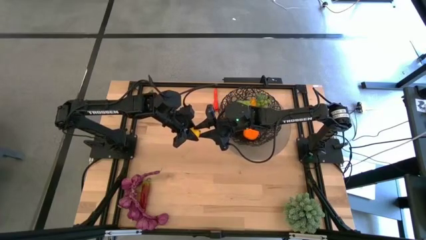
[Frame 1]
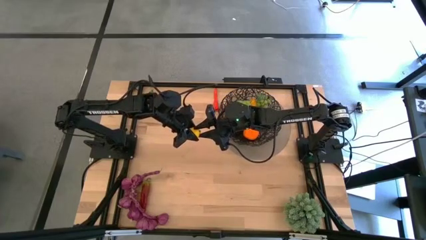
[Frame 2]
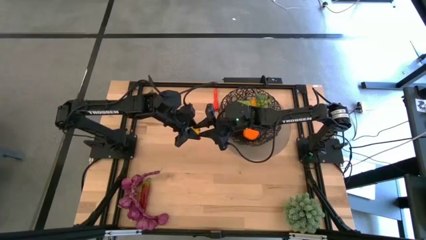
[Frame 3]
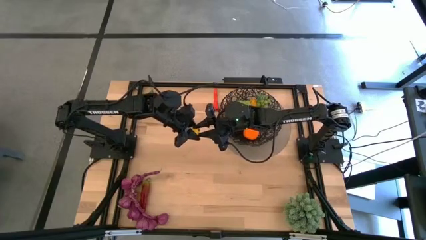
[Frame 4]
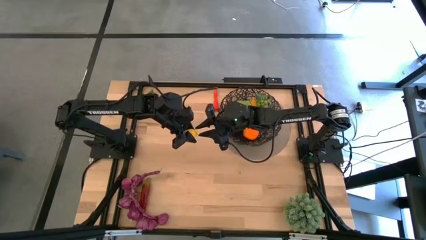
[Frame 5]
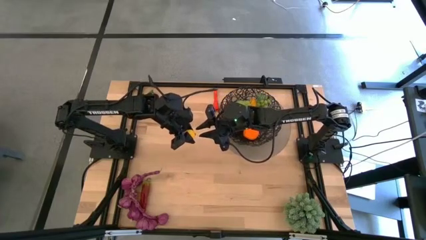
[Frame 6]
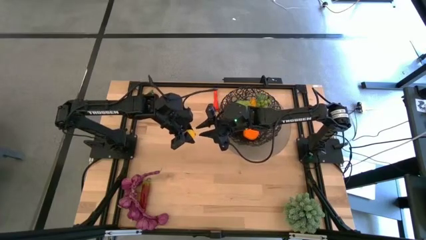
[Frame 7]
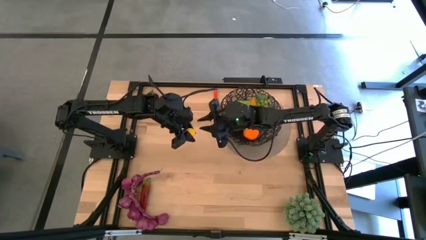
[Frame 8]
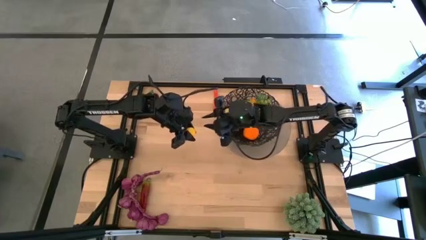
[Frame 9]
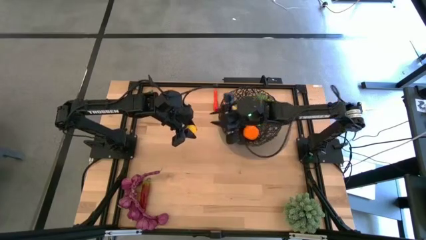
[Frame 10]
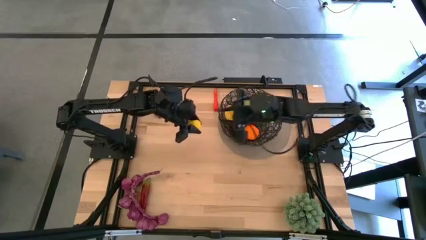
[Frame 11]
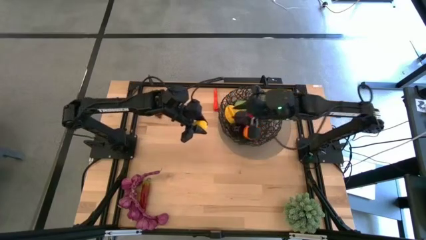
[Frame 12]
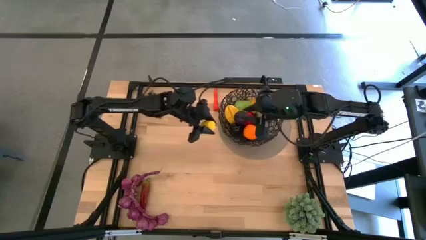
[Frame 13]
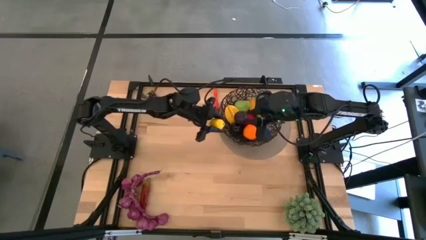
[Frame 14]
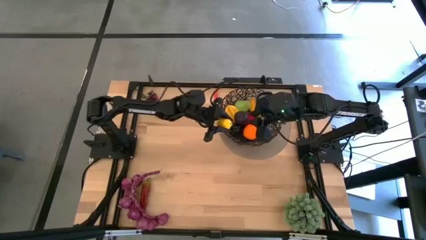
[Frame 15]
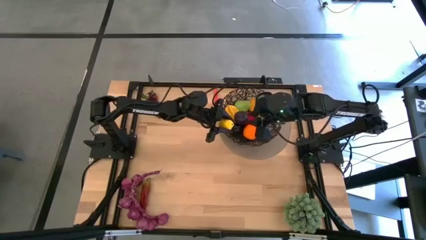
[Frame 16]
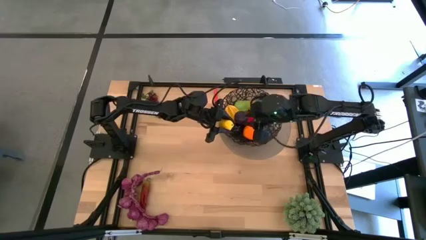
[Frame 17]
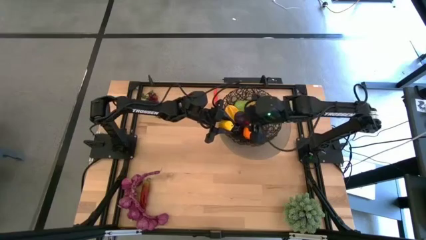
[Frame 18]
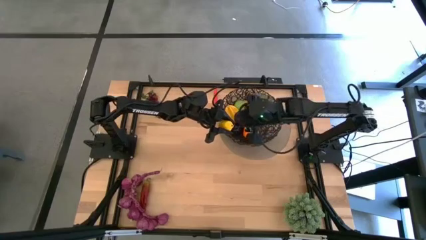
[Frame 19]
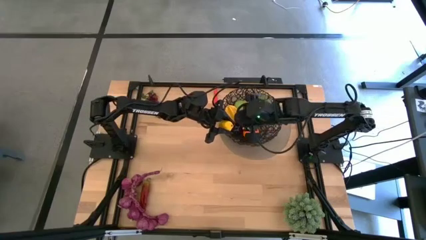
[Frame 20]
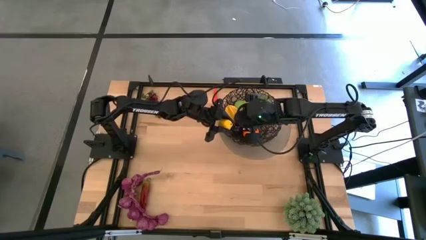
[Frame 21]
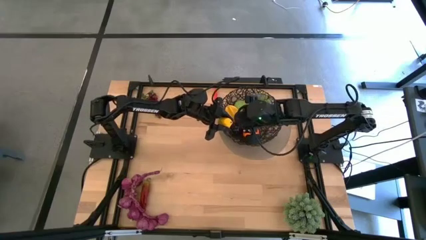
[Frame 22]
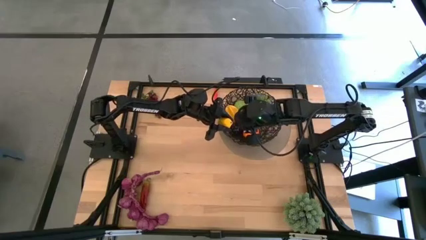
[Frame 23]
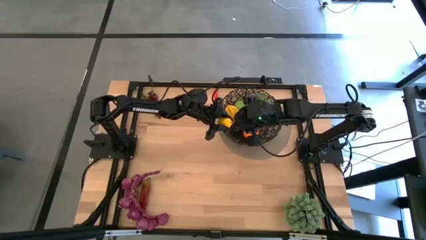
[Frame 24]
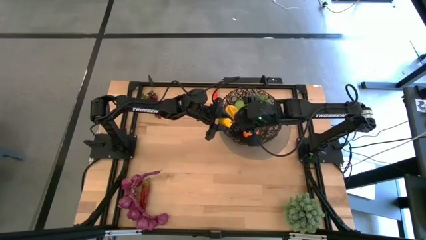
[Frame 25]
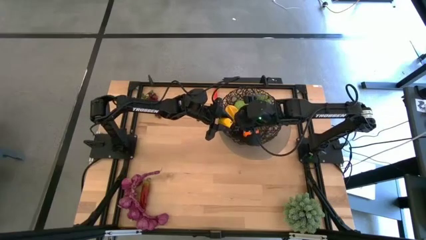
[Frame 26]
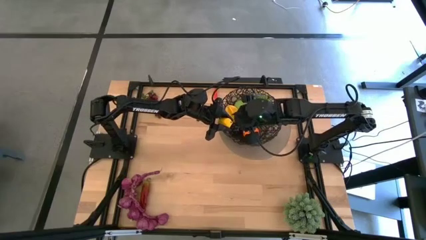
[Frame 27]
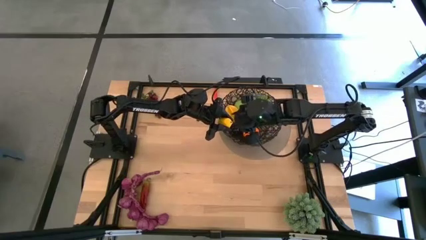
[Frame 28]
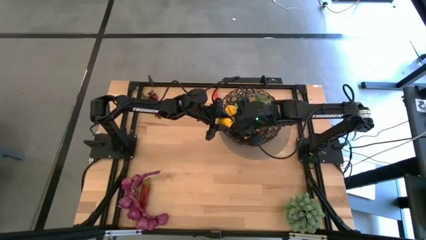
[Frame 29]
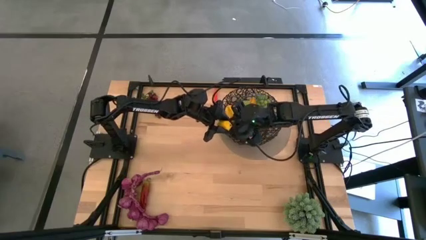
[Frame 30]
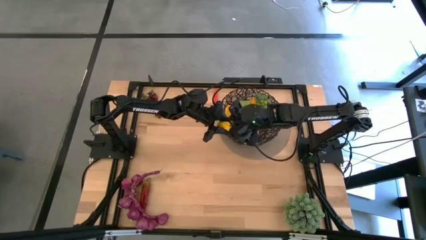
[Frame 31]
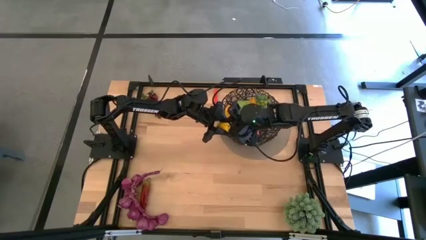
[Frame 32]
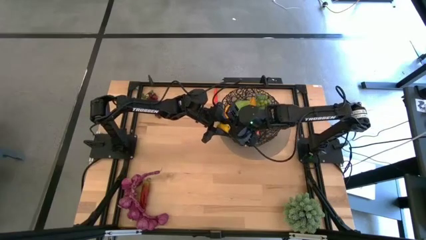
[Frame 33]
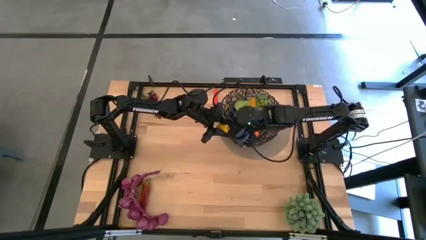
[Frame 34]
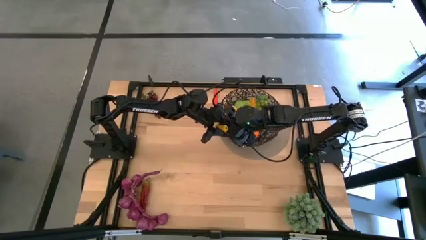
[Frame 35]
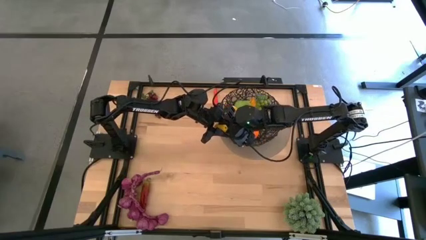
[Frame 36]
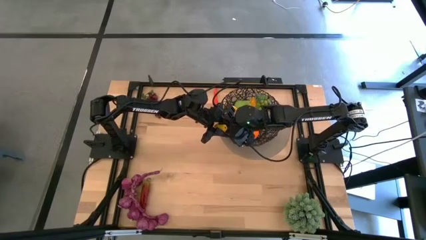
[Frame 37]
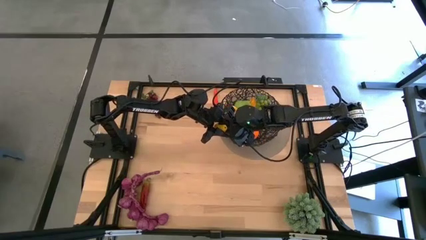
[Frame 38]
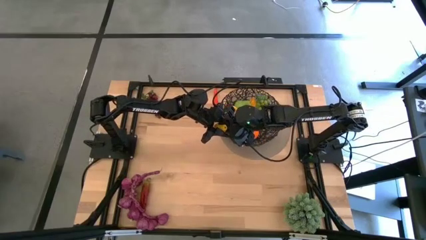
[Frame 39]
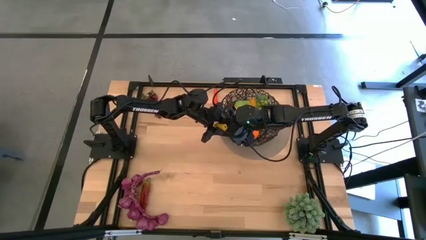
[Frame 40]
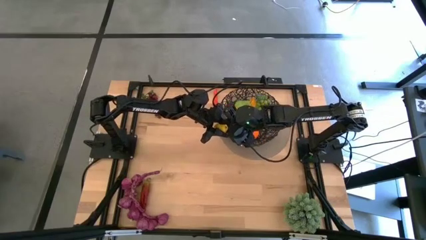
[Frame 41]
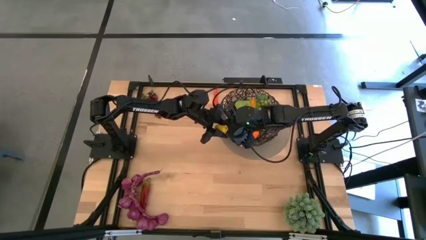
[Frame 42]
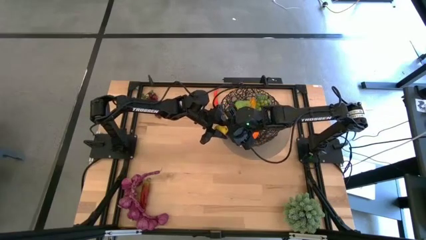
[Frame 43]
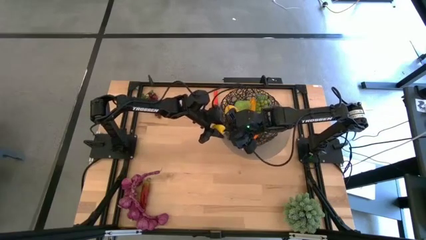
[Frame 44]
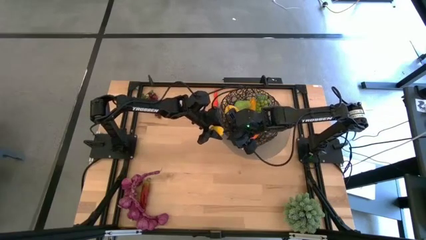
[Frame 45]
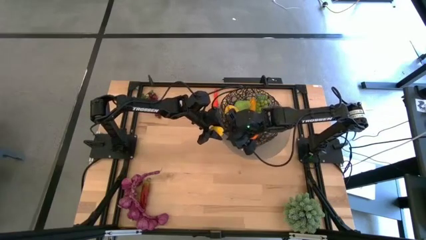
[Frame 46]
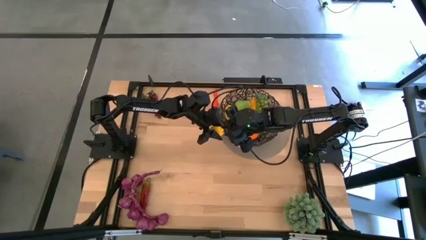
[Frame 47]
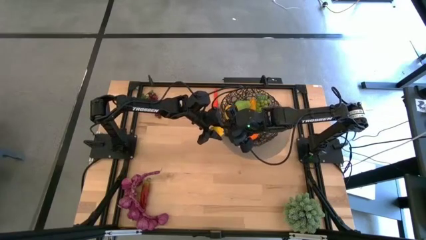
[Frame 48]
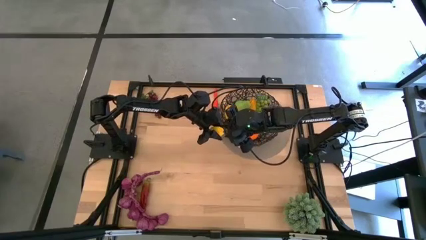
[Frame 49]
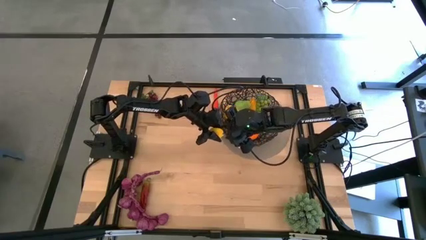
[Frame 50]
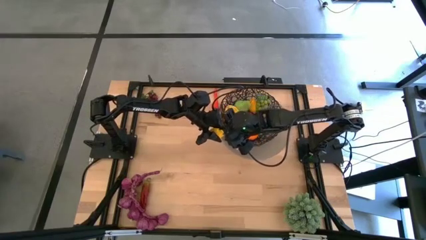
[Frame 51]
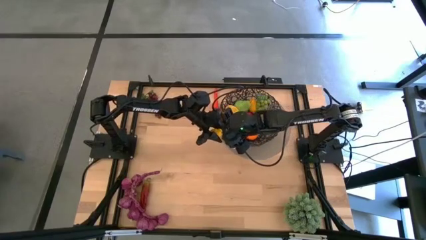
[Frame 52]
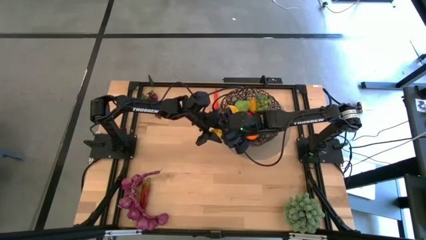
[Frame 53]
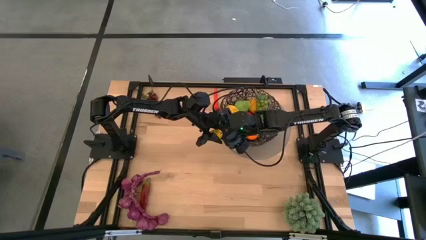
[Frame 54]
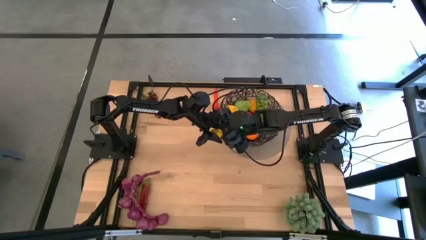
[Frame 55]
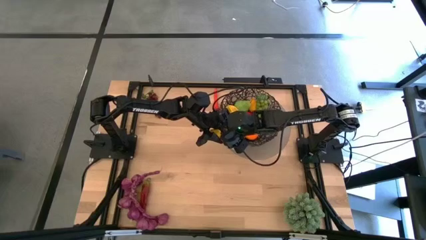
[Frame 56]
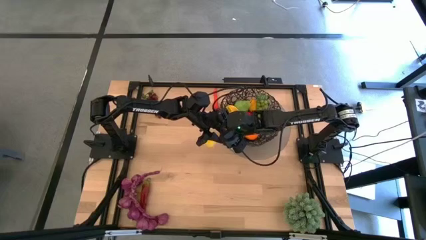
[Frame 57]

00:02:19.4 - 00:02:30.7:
Task: Build produce basket
Put the lemon into the black wire basket

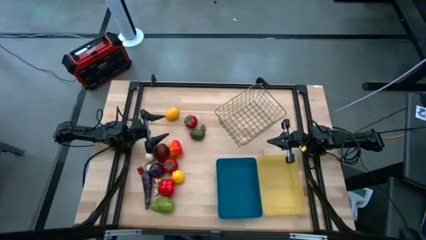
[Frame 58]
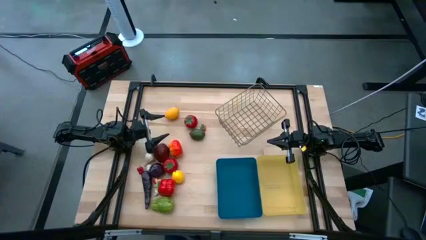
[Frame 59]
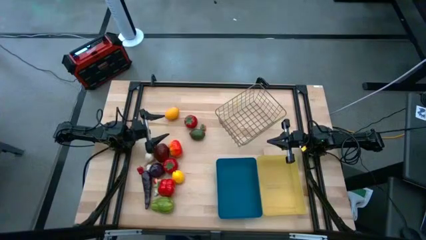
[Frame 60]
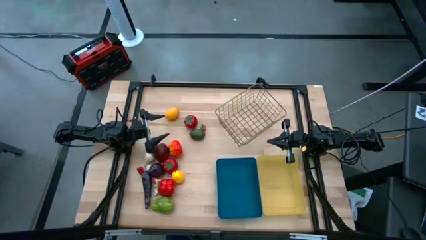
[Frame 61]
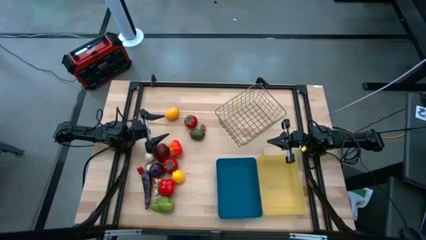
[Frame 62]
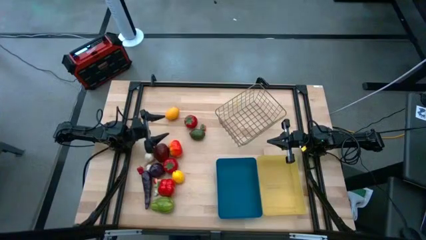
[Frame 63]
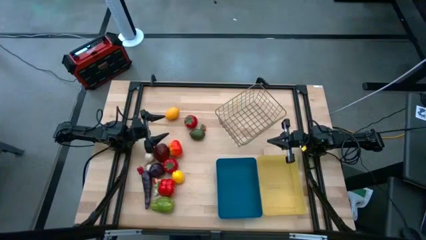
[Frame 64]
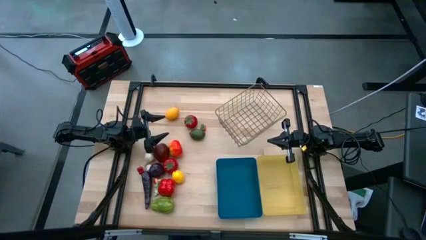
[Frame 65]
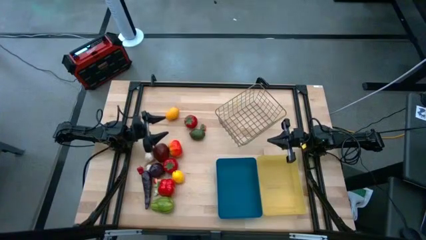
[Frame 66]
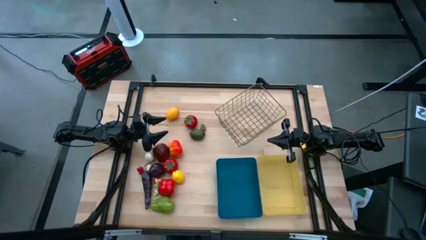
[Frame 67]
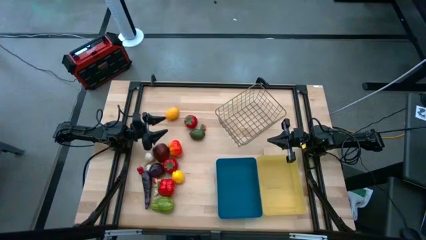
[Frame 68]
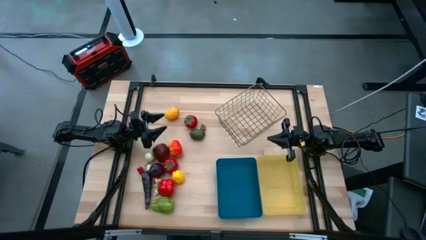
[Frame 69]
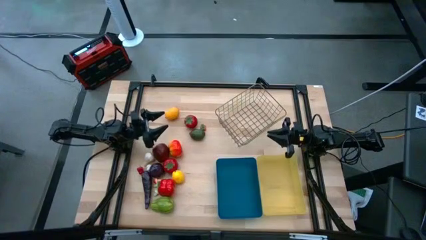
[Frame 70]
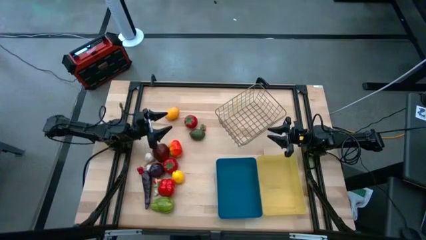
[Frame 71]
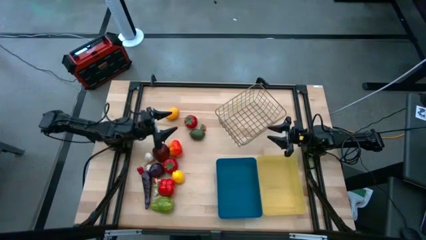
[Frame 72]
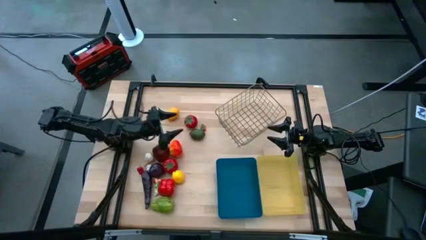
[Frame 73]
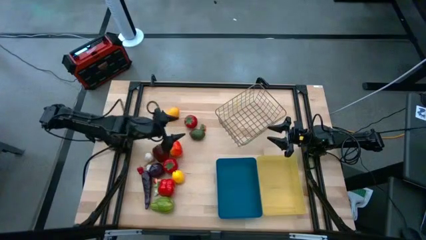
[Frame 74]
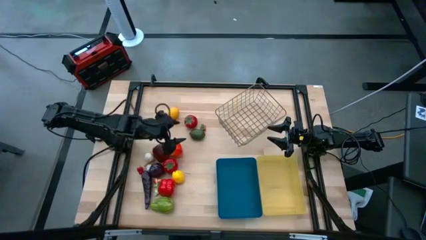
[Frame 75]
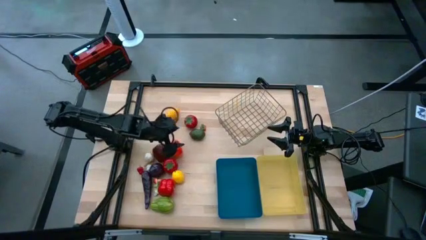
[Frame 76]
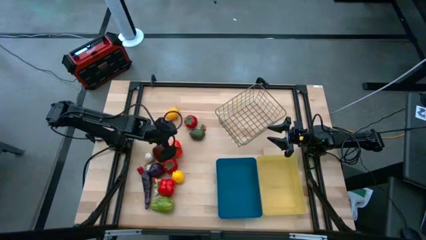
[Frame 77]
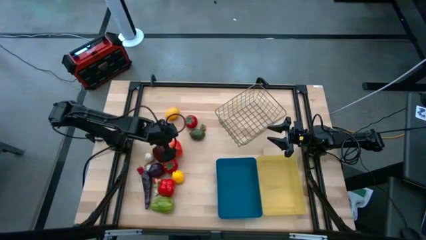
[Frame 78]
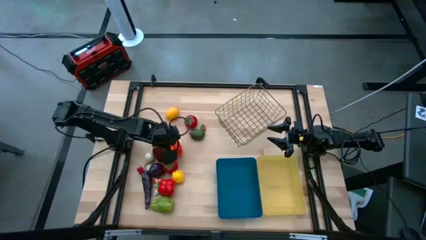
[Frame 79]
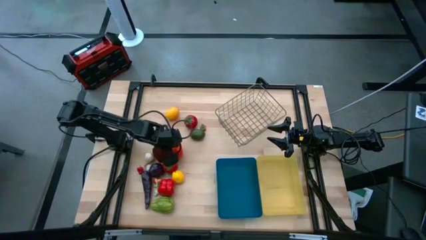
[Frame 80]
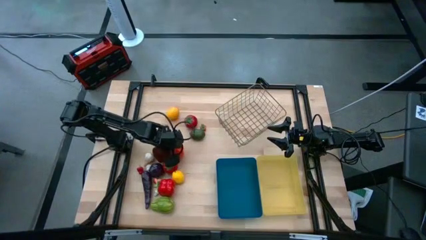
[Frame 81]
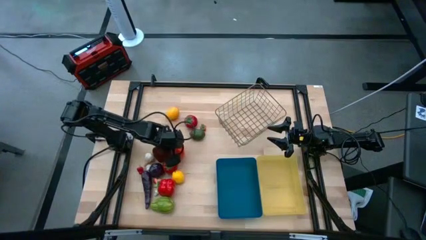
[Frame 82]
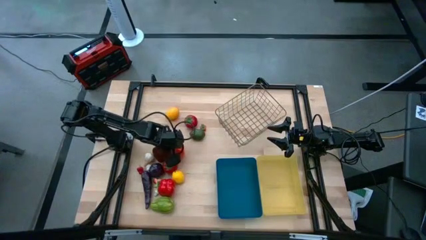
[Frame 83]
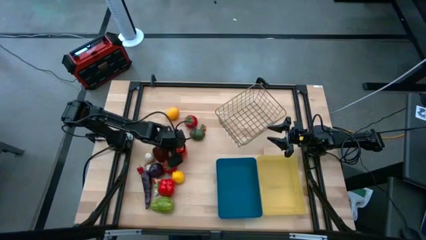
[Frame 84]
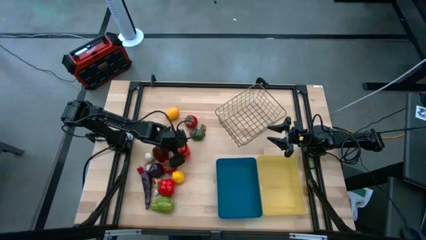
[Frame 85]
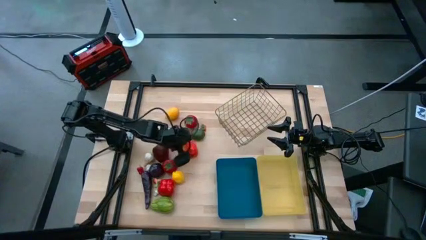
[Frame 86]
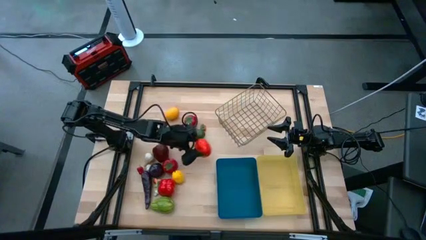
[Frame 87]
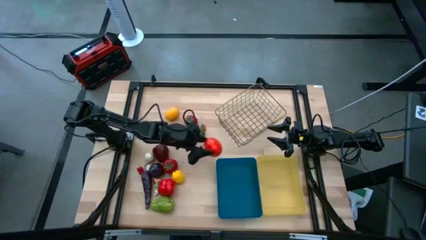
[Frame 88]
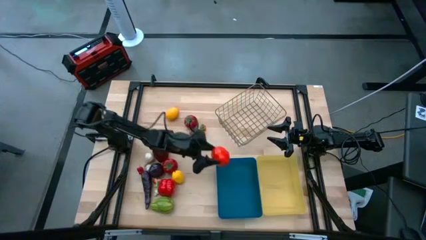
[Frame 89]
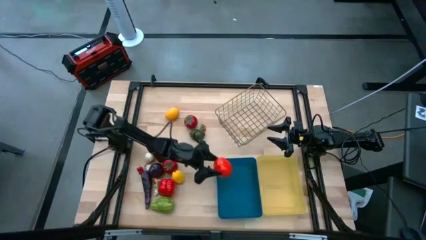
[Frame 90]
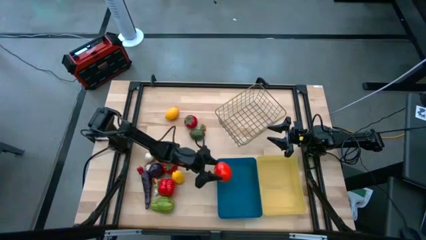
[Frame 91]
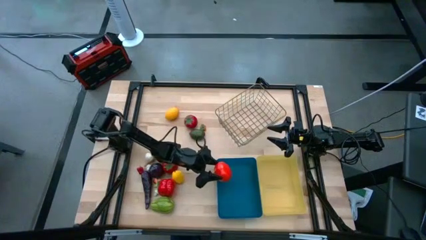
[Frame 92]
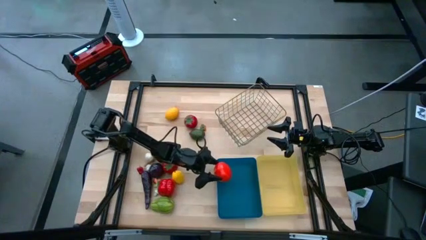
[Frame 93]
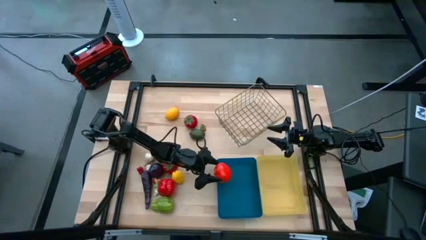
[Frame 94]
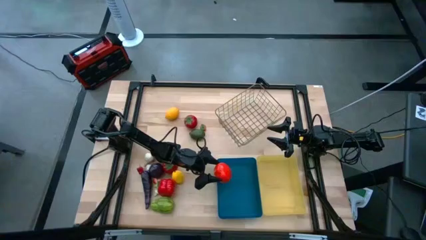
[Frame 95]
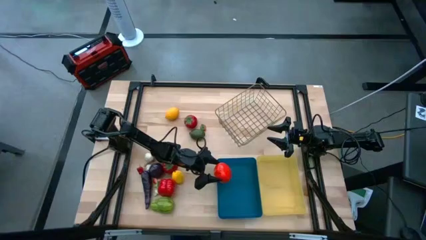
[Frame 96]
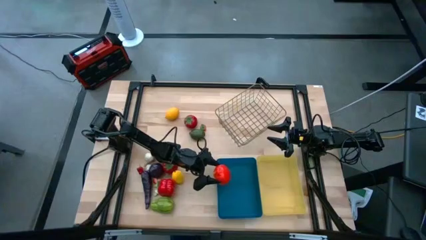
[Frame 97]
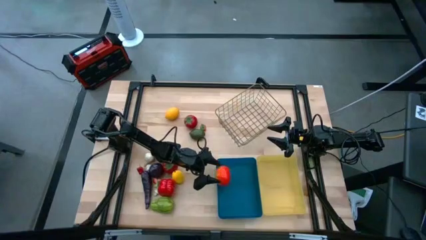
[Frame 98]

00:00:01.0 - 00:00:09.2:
Task: Sort produce into baskets
Put the yellow tomato into the blue bin
